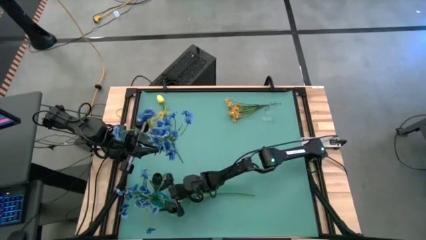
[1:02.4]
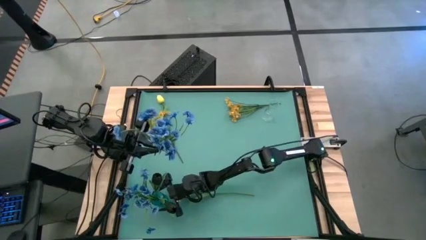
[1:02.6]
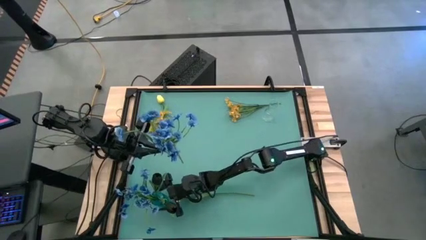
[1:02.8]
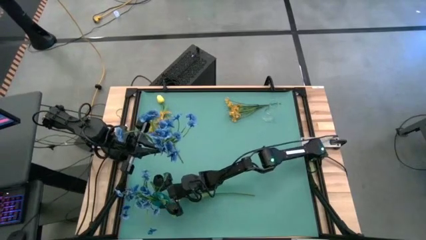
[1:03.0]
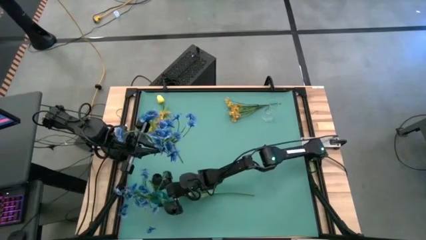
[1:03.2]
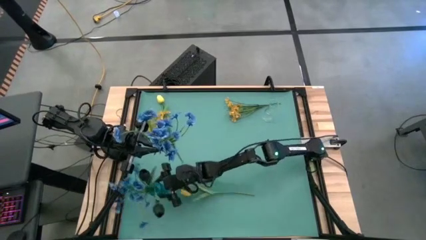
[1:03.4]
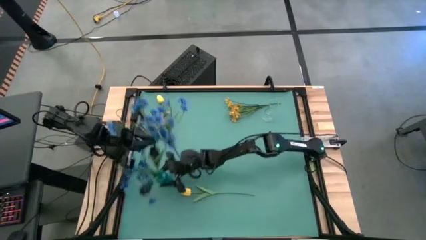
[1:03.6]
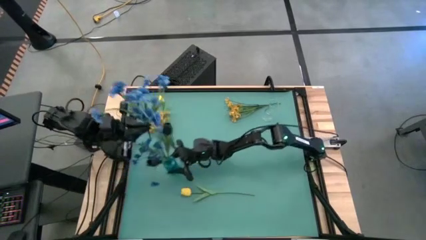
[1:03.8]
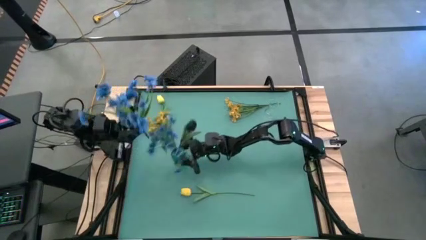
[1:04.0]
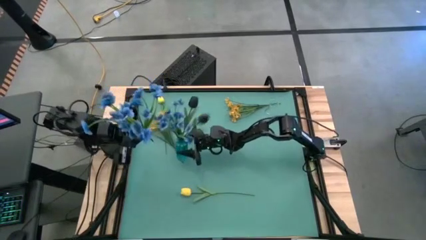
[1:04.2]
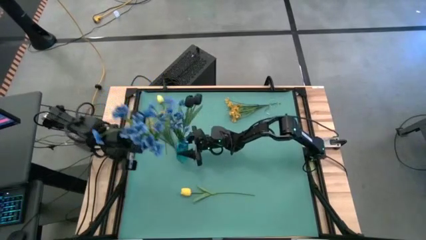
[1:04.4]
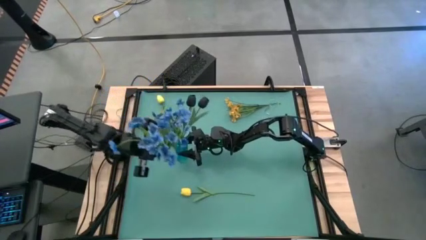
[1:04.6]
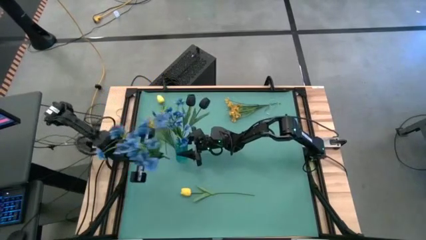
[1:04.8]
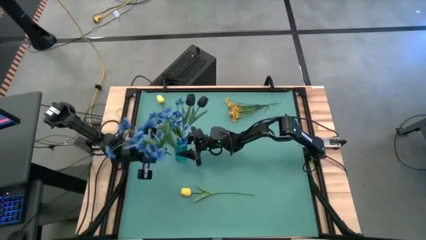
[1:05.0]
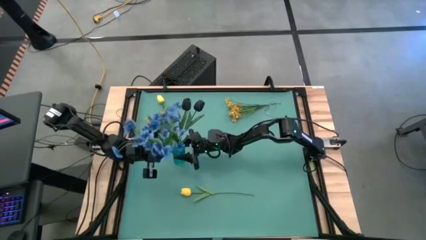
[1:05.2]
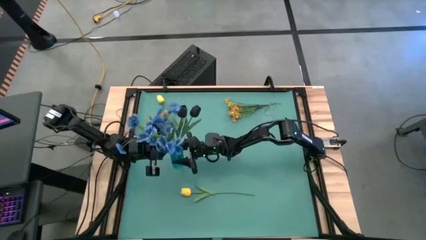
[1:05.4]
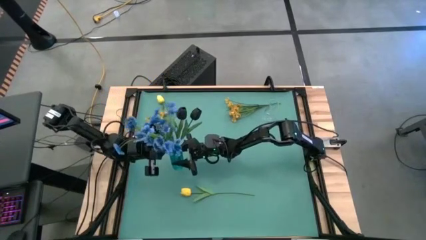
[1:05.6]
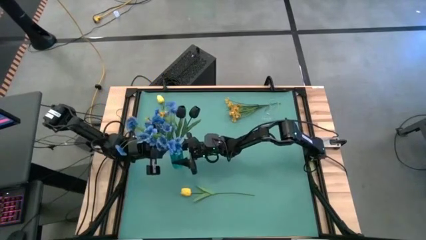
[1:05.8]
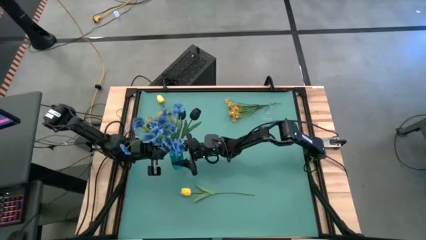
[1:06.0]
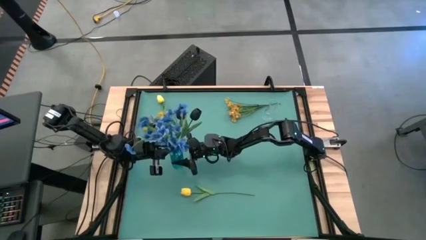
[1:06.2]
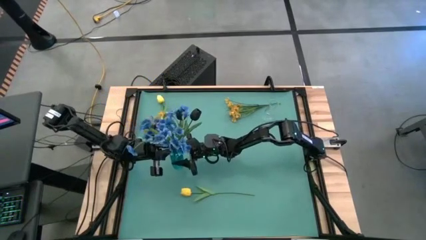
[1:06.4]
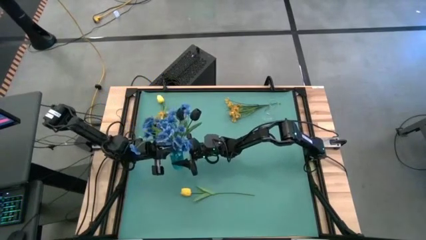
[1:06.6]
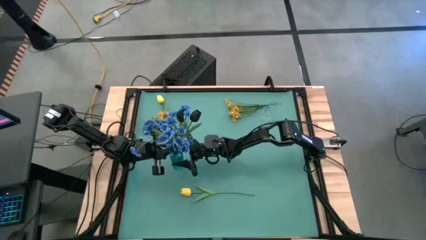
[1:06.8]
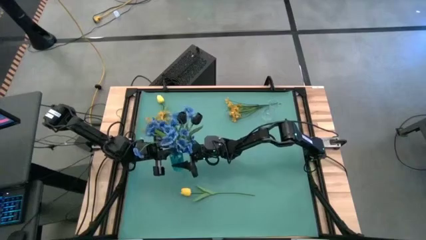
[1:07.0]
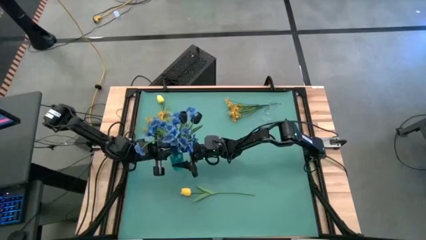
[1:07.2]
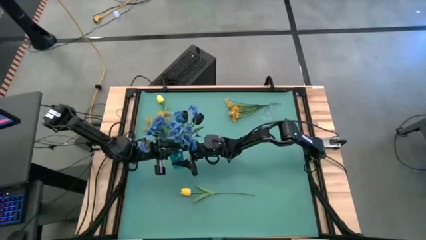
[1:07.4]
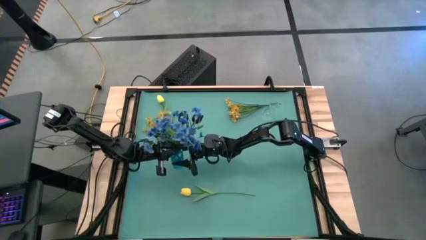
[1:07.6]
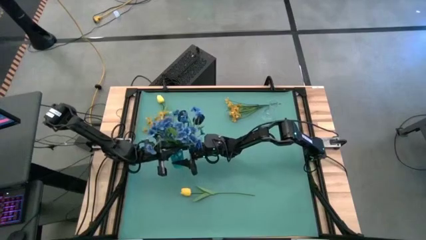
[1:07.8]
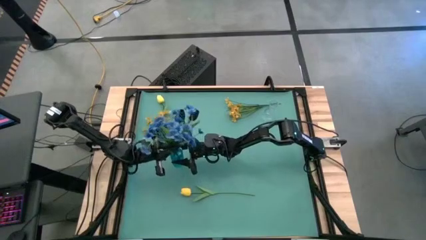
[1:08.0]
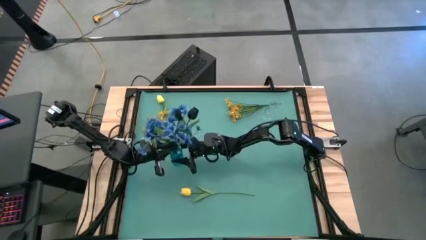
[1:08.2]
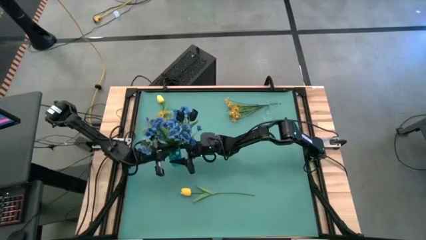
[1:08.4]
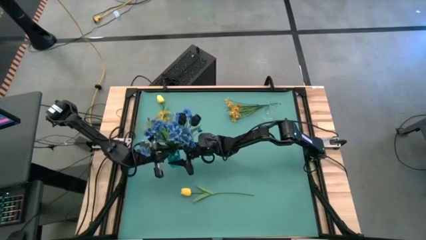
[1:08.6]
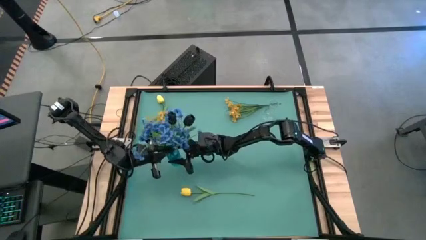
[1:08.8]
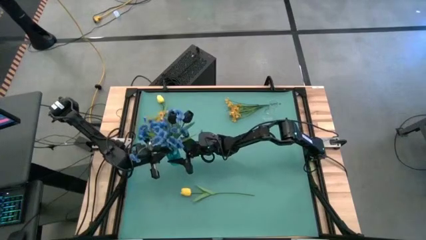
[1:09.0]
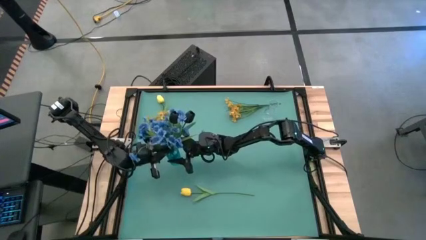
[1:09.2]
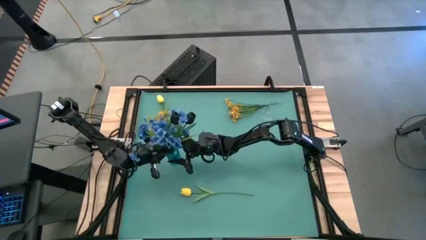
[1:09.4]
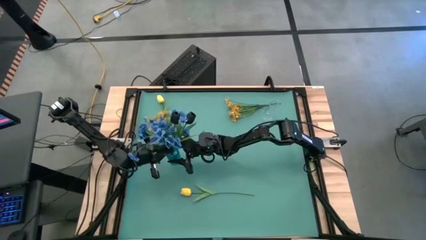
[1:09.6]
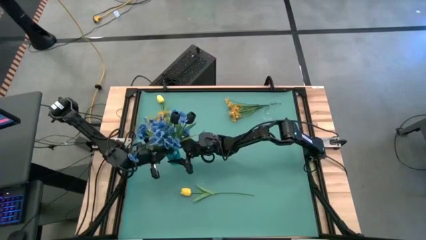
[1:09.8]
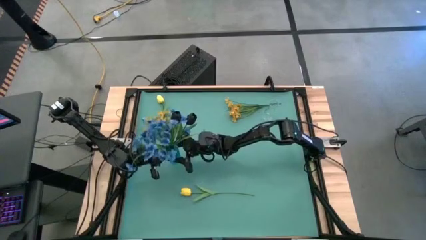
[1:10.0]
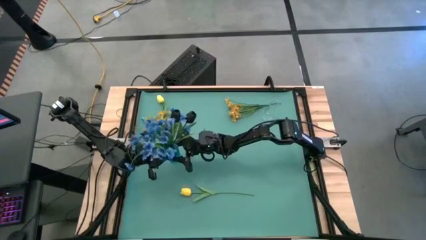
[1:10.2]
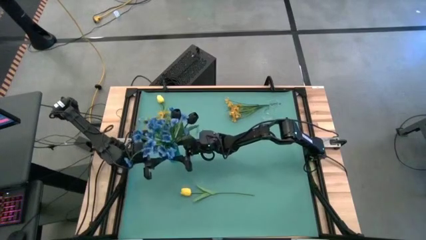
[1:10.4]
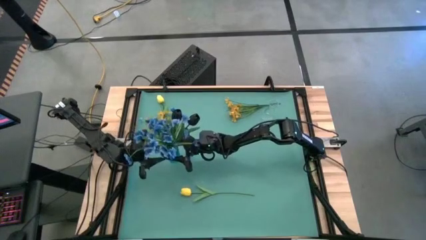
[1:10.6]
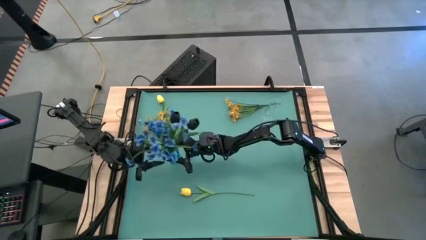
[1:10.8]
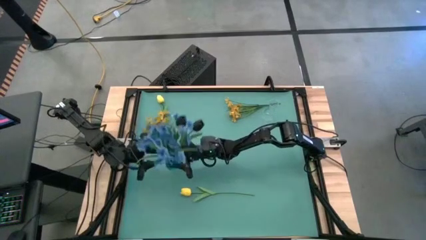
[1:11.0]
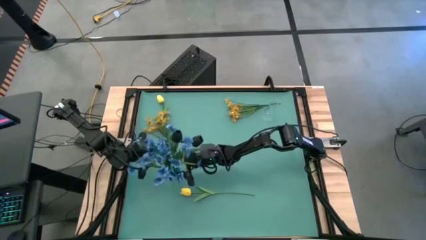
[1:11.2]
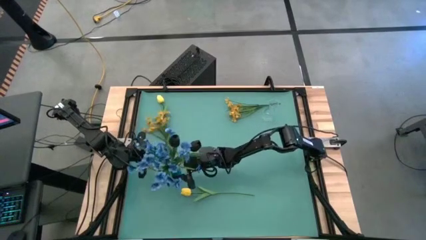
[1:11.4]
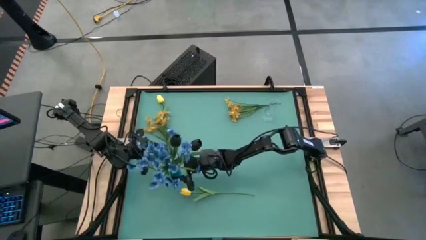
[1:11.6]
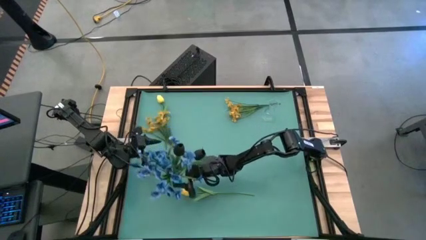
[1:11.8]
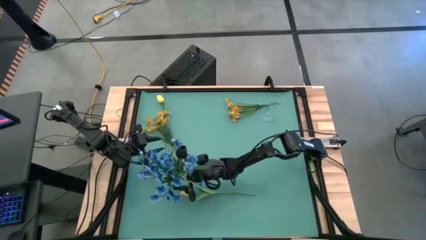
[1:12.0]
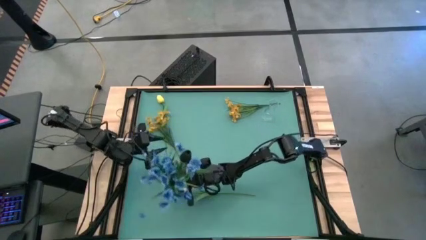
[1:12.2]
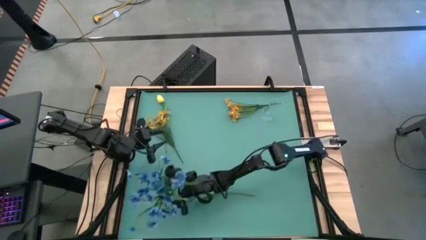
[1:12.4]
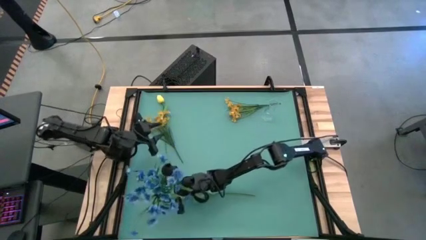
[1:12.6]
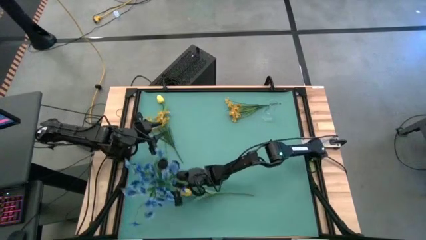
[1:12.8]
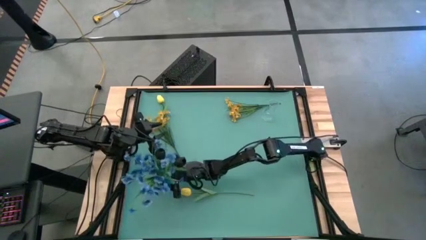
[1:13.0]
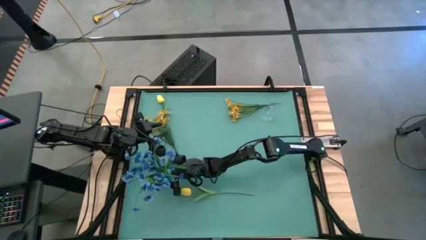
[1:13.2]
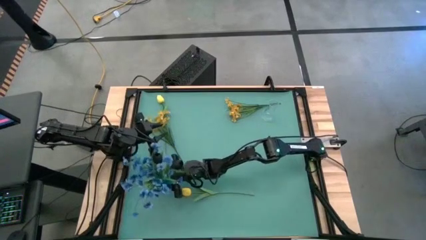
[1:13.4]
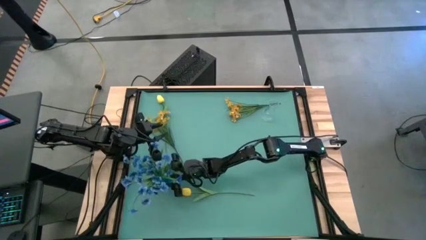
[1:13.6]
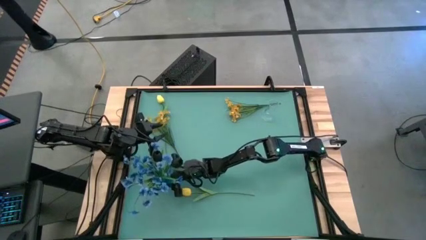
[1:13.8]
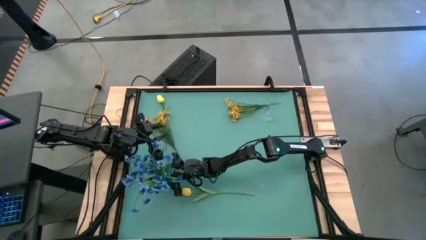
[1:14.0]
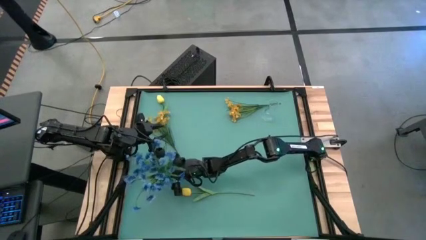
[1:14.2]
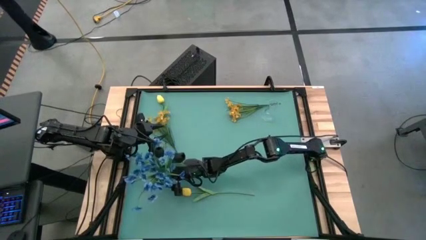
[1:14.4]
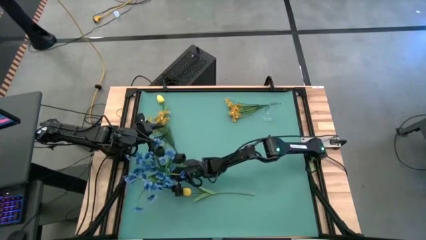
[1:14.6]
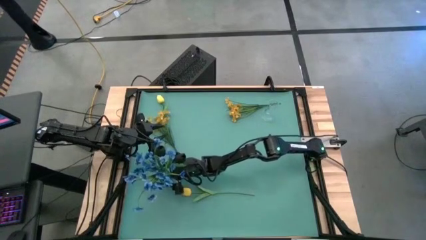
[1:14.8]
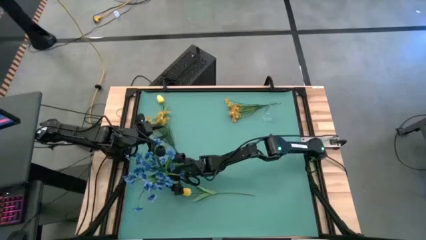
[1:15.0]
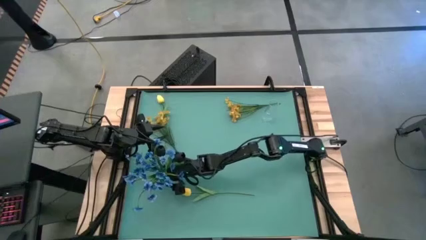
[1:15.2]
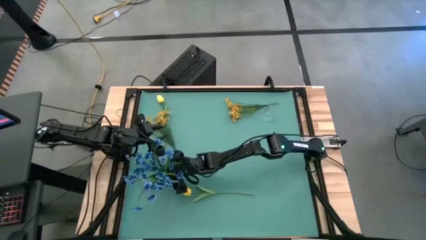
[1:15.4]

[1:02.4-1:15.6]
Task: Sort flowers into vase by color
Put the blue flowers into the blue flower vase
